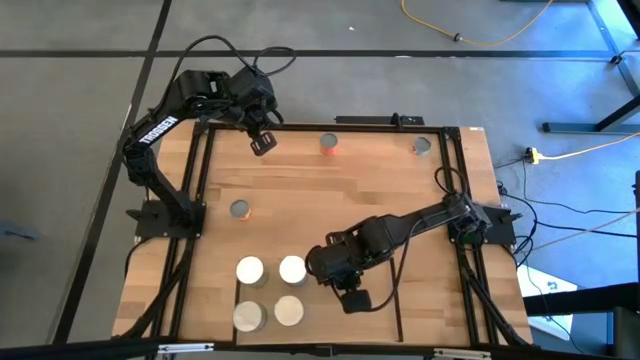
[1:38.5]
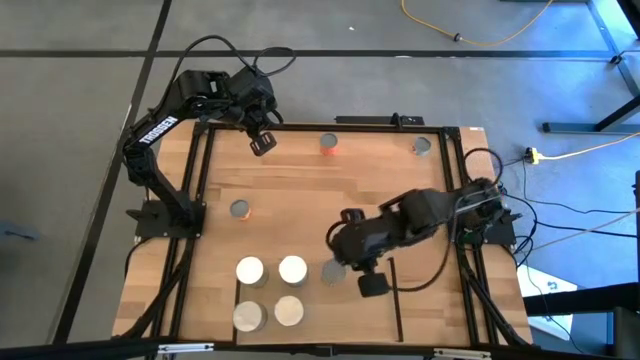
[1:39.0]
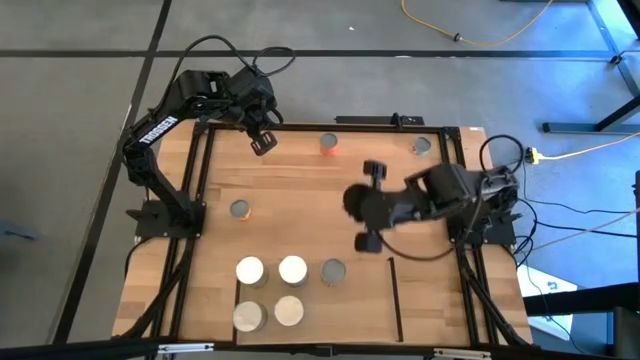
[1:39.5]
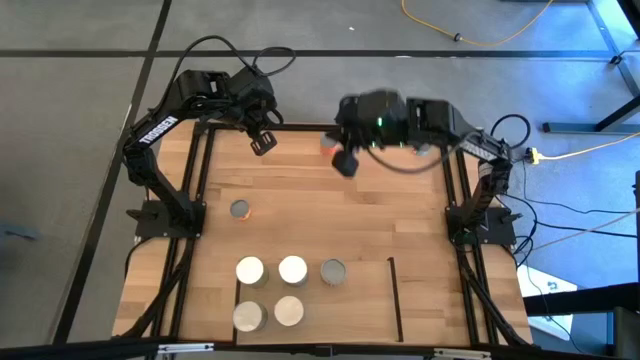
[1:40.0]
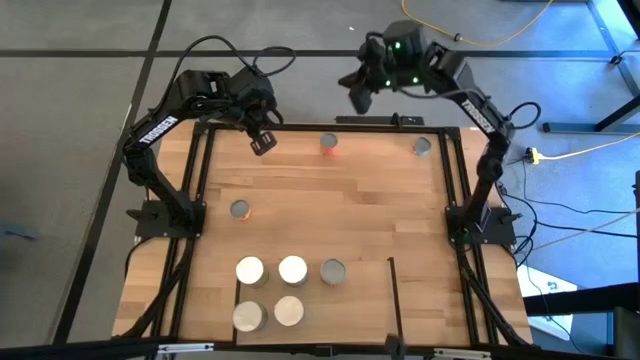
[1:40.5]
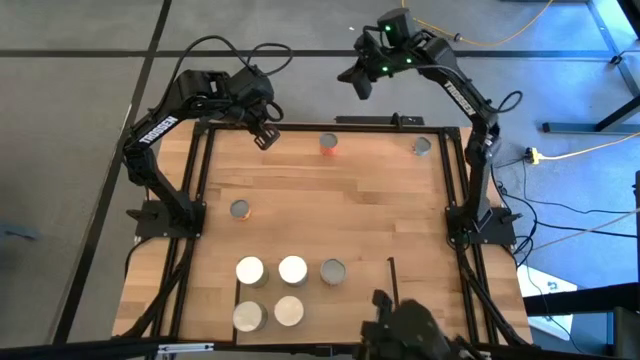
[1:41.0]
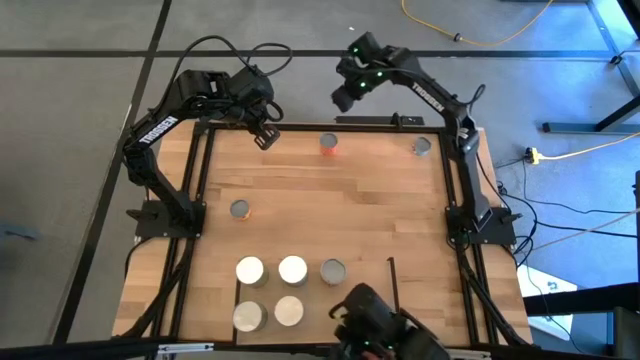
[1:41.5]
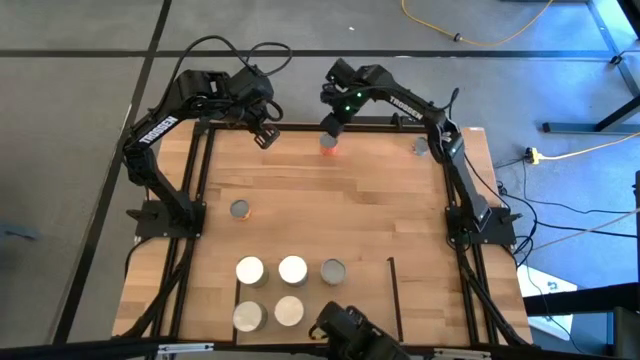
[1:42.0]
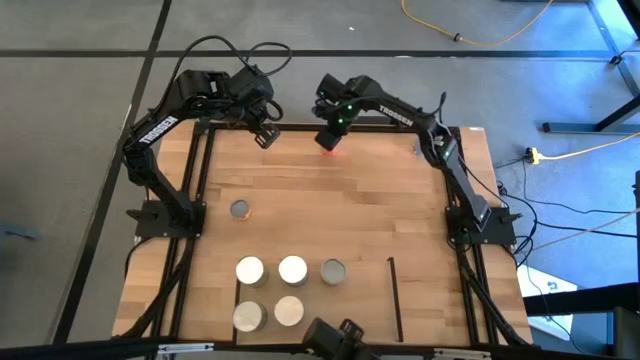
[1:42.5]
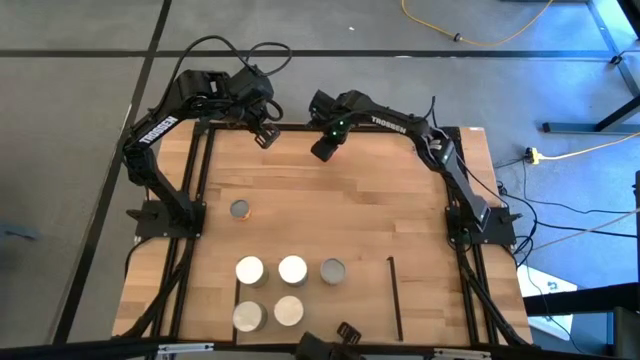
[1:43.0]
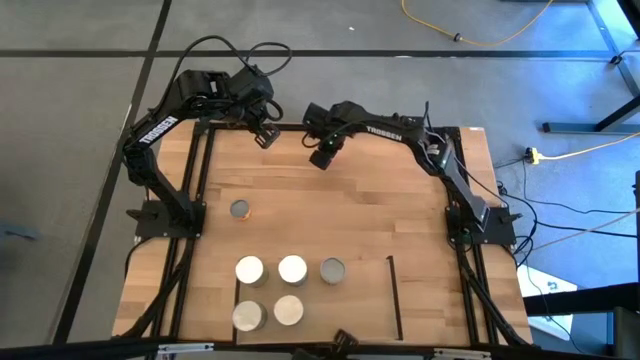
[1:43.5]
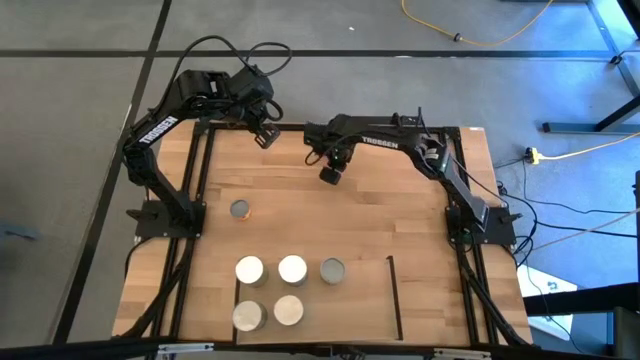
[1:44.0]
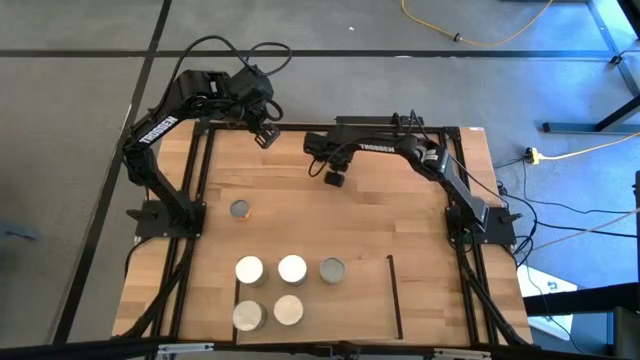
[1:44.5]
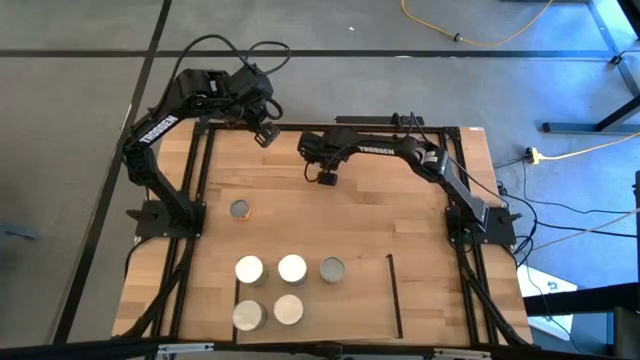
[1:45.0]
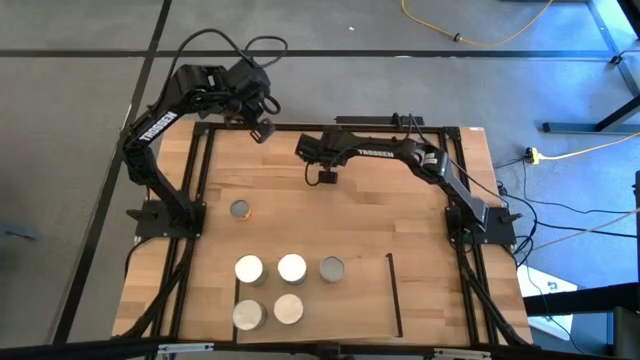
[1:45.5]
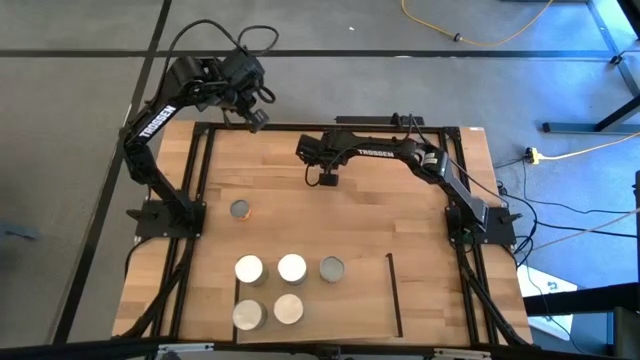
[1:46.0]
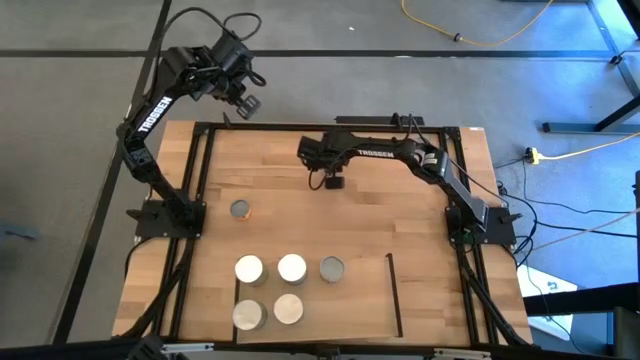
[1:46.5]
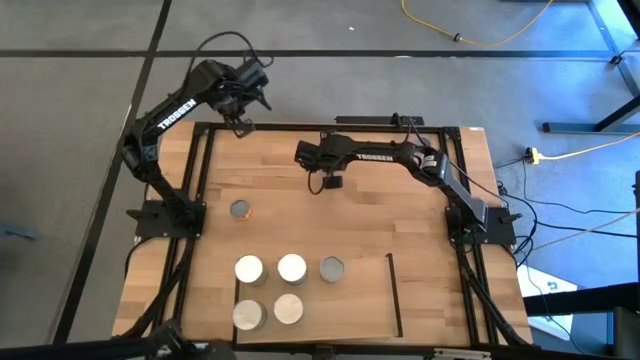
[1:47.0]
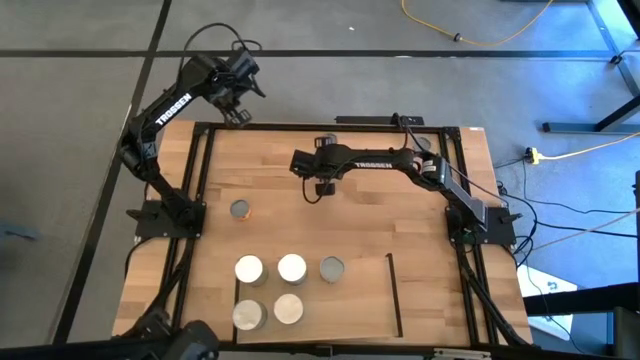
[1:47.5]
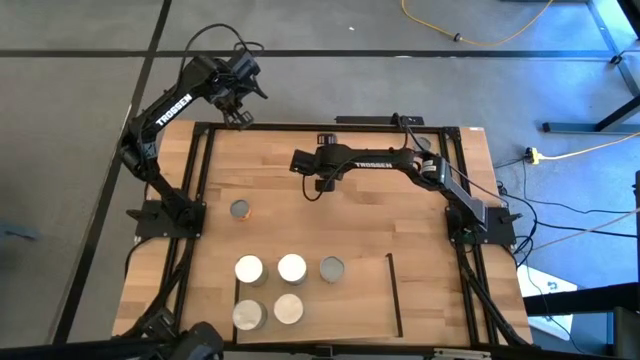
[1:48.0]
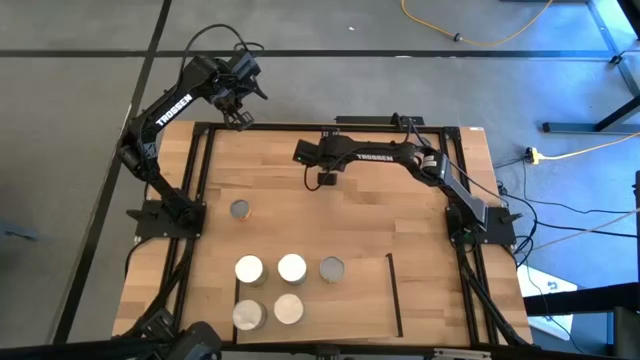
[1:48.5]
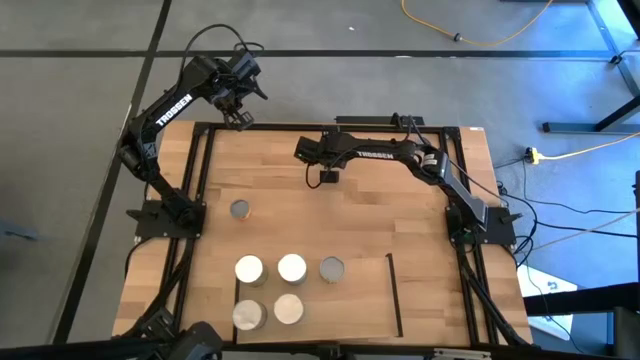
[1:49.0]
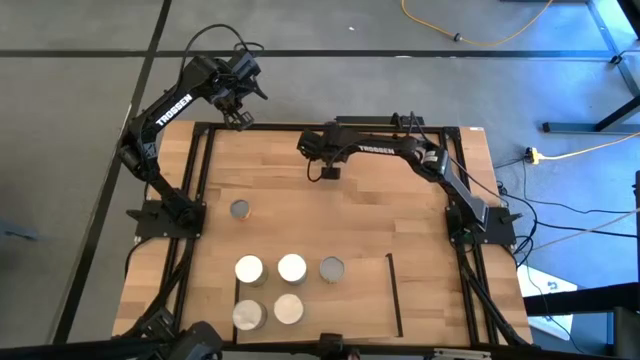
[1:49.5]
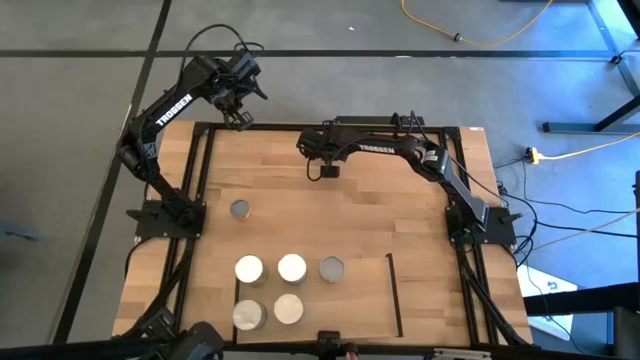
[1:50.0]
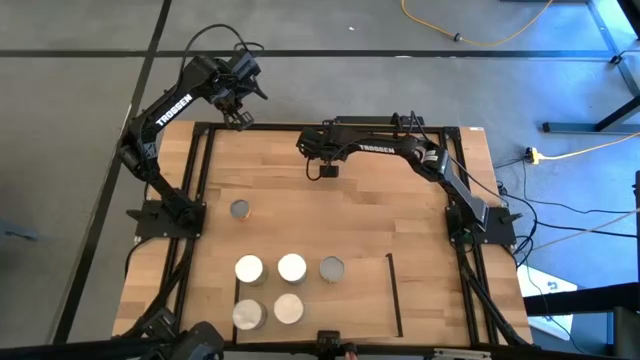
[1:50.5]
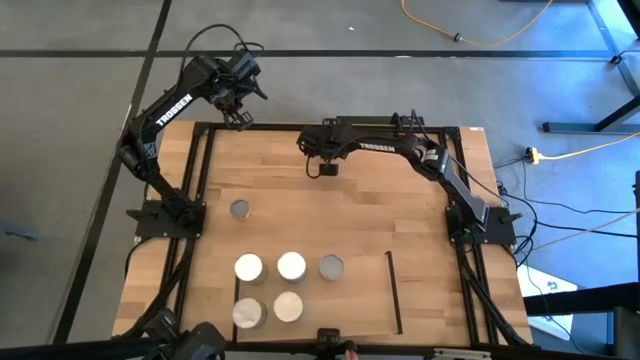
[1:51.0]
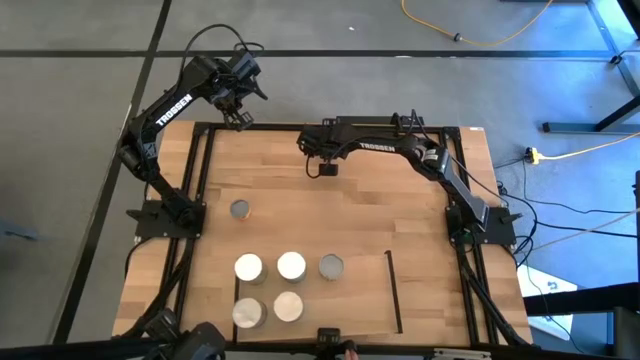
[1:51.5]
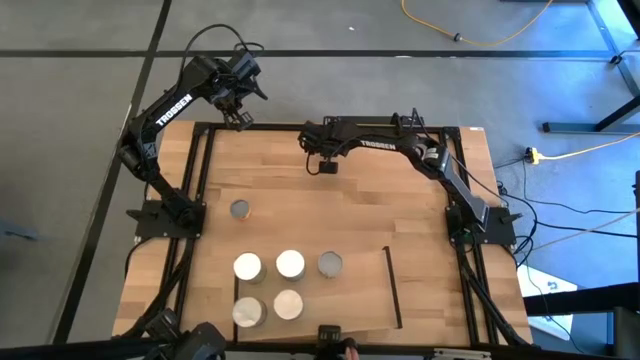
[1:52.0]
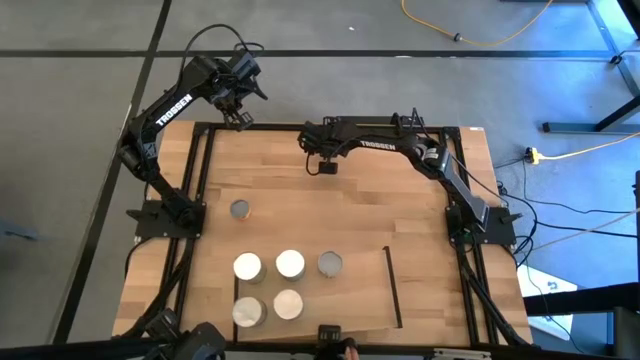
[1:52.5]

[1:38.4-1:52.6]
Task: Pick and place cans onto a shelf
Put the canned meat balls on the shelf

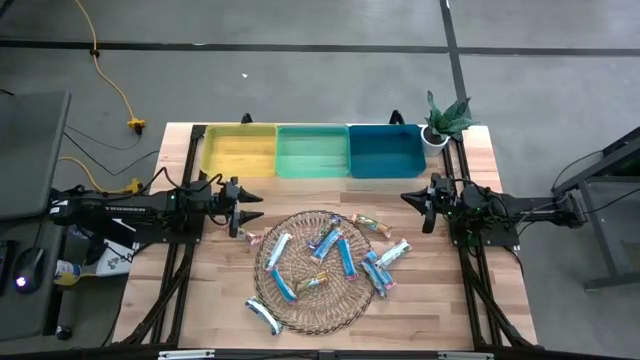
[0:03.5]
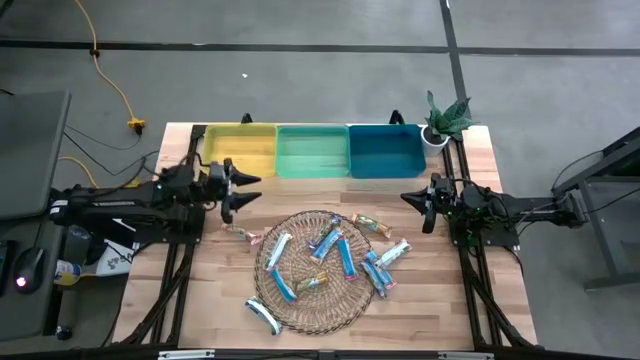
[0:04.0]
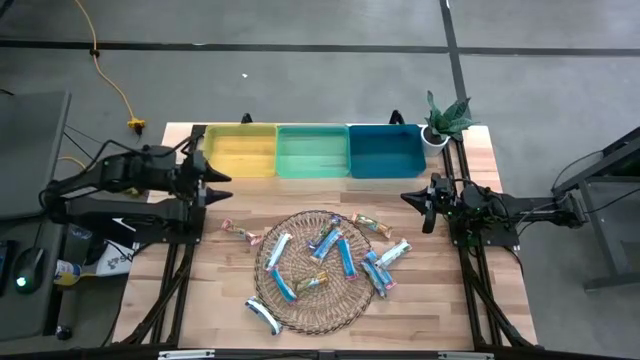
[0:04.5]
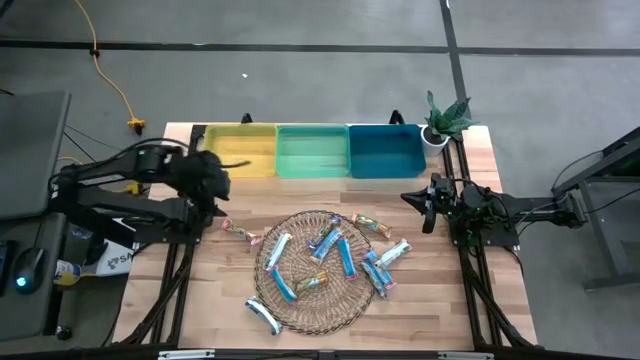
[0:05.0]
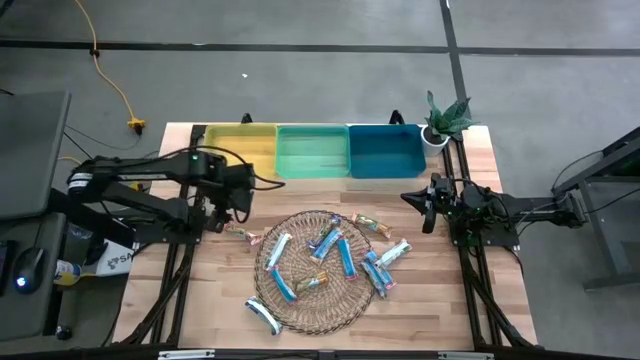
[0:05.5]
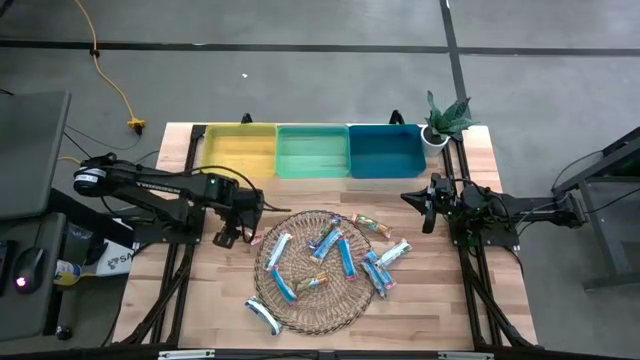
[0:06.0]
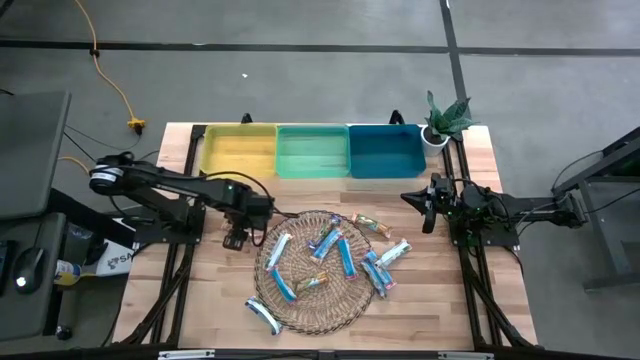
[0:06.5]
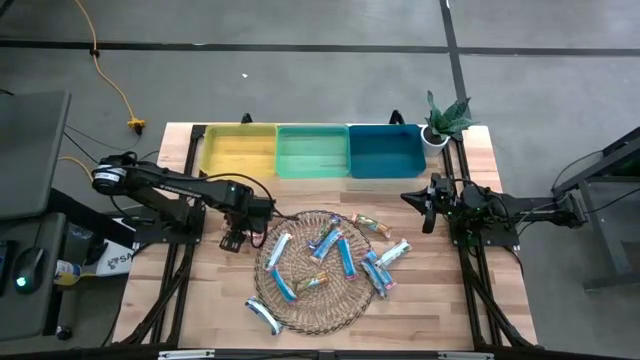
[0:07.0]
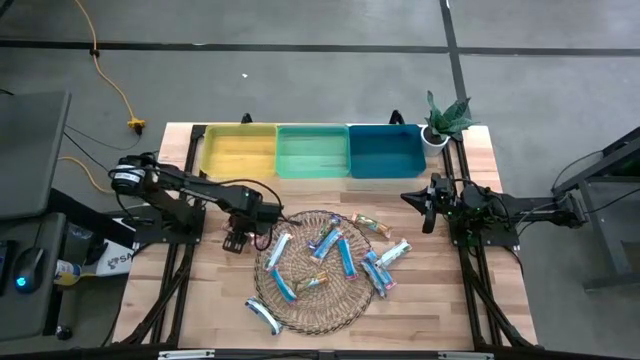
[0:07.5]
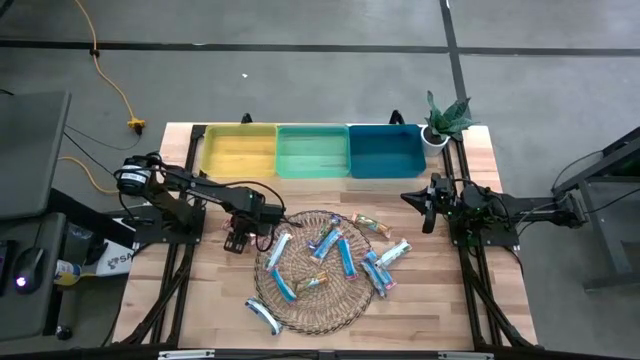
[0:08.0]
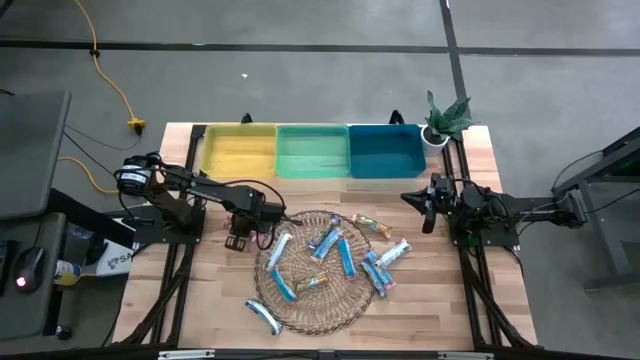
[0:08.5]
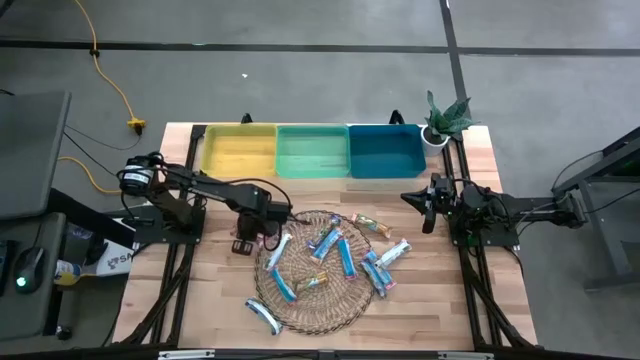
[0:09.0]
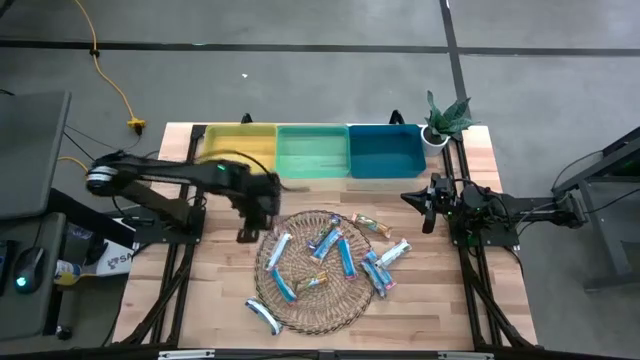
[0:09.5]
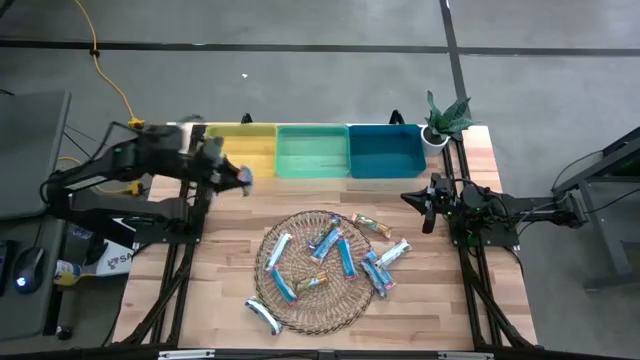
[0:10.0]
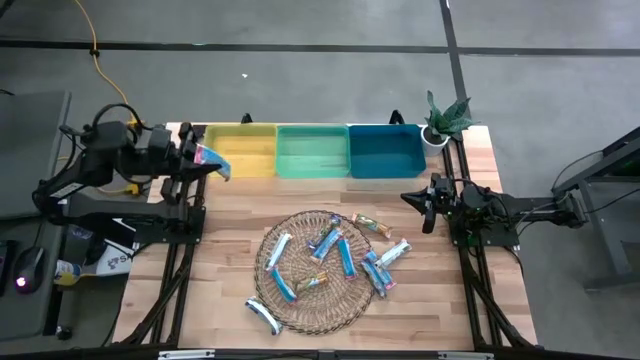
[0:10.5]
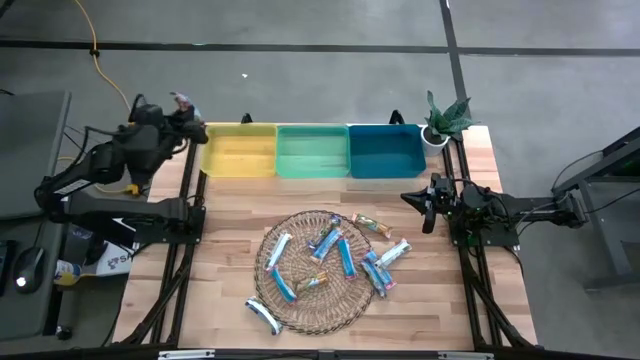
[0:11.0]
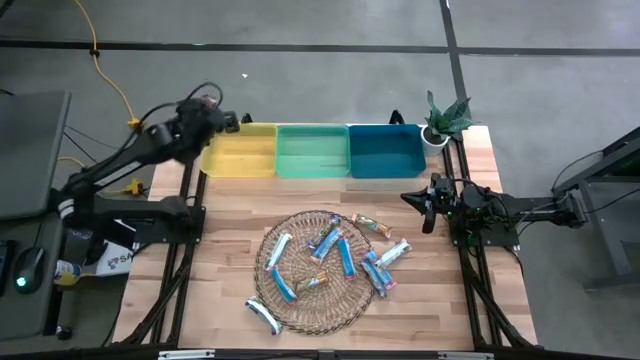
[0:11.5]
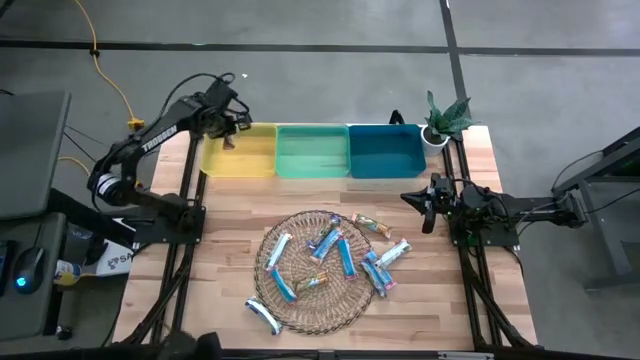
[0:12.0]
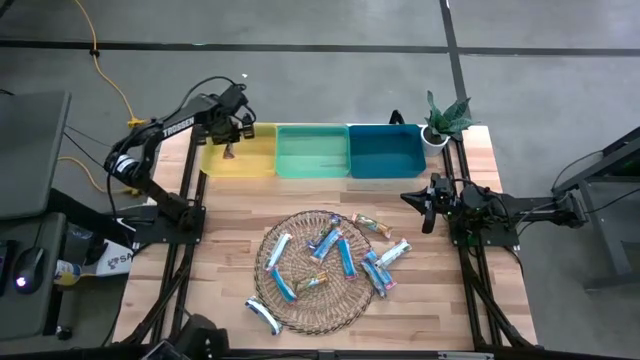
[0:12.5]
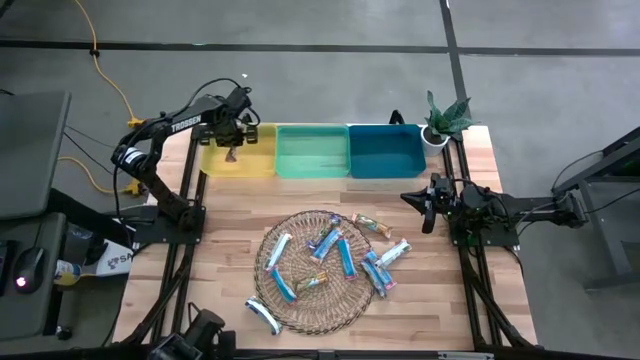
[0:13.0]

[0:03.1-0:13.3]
Task: Pick and place Granola Bars by type
Put the red granola bar into the yellow bin
